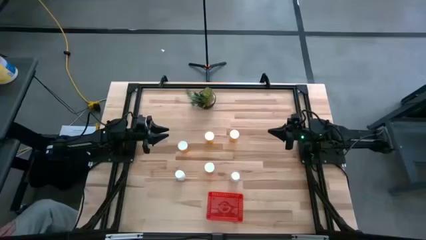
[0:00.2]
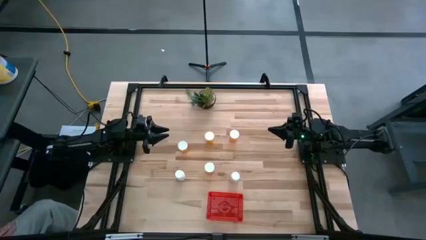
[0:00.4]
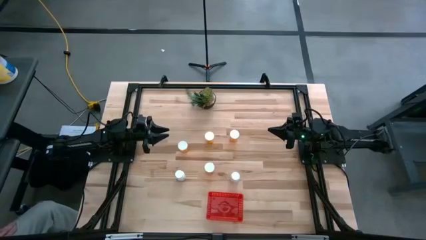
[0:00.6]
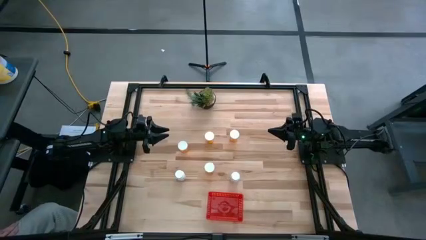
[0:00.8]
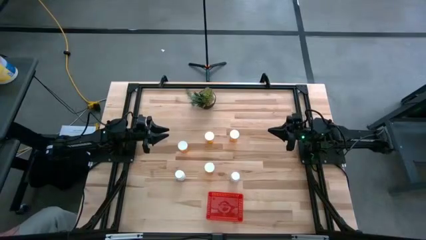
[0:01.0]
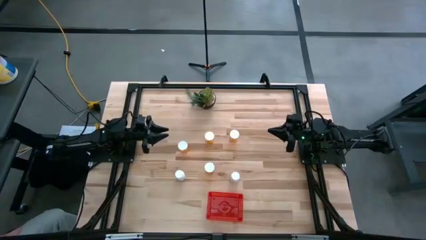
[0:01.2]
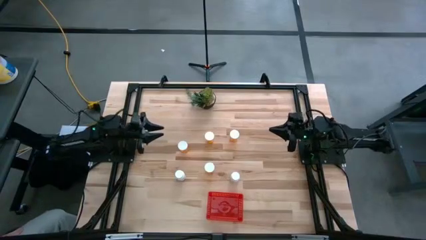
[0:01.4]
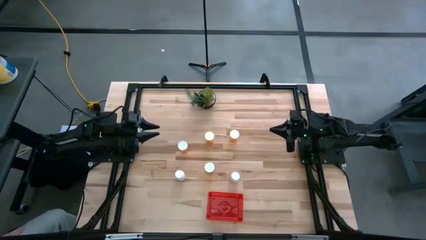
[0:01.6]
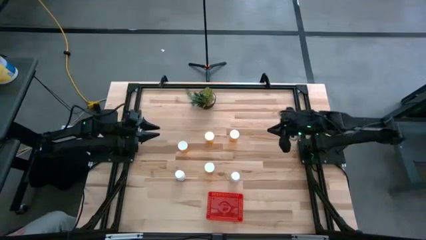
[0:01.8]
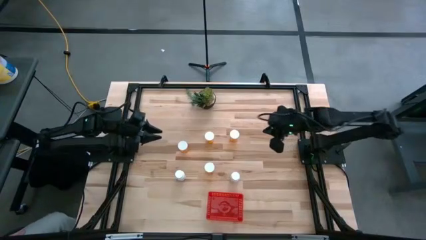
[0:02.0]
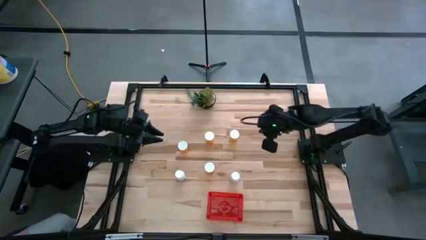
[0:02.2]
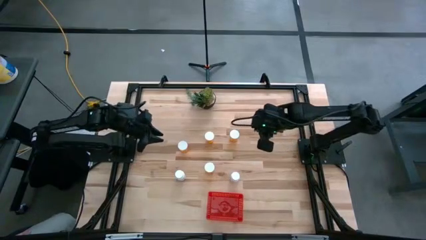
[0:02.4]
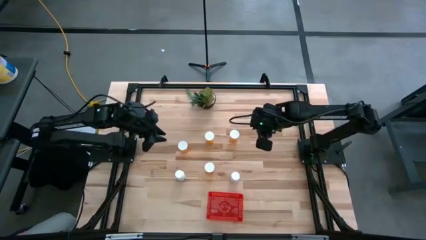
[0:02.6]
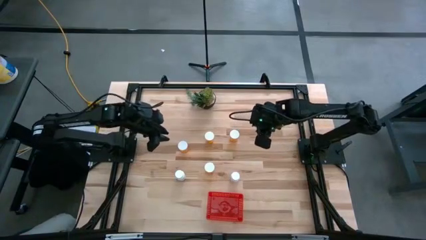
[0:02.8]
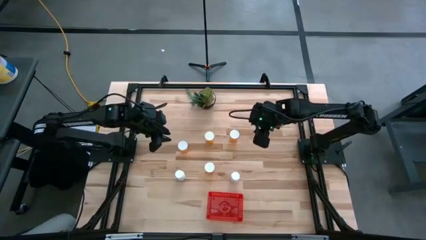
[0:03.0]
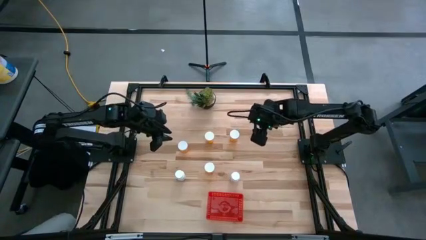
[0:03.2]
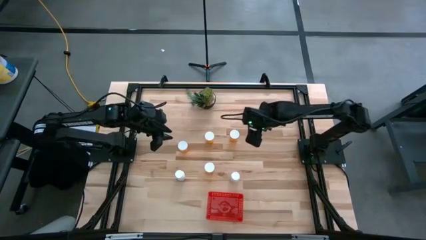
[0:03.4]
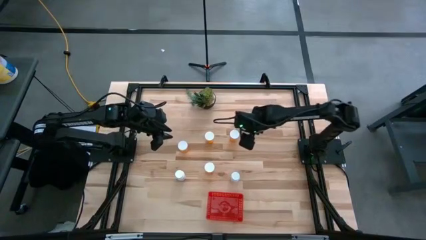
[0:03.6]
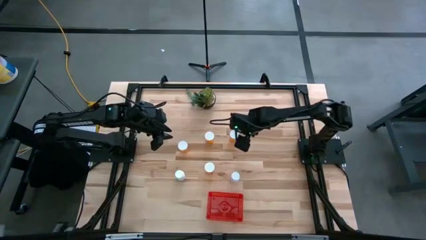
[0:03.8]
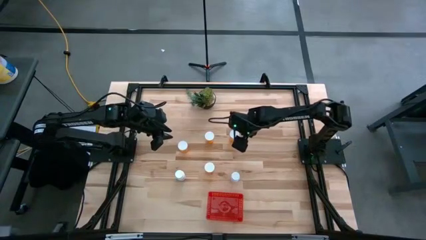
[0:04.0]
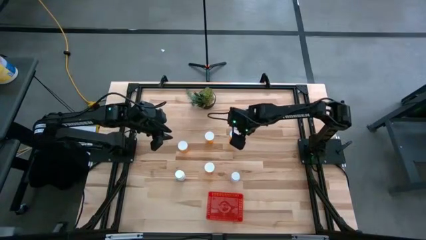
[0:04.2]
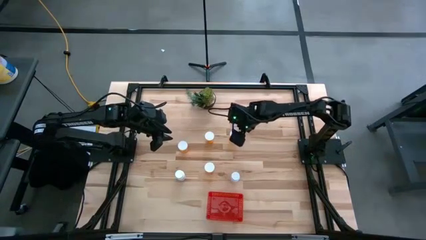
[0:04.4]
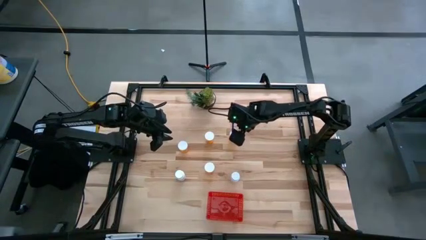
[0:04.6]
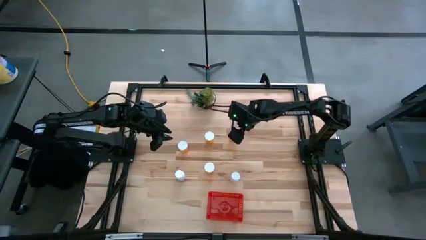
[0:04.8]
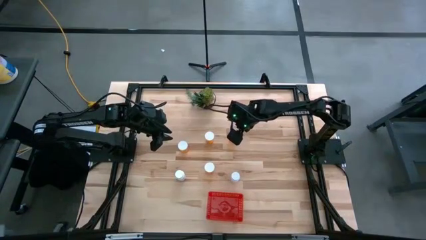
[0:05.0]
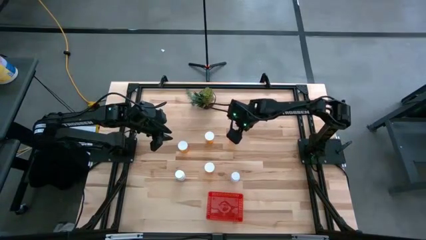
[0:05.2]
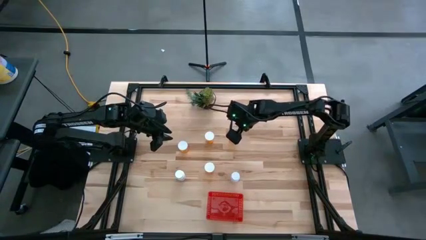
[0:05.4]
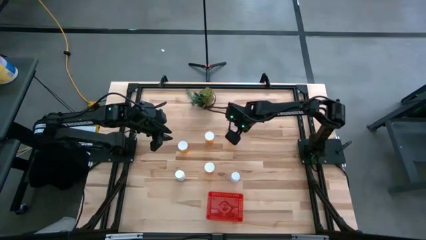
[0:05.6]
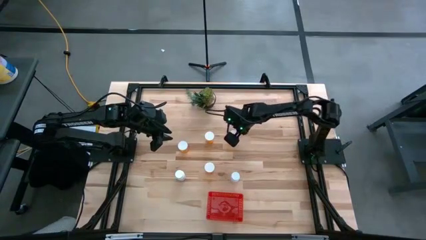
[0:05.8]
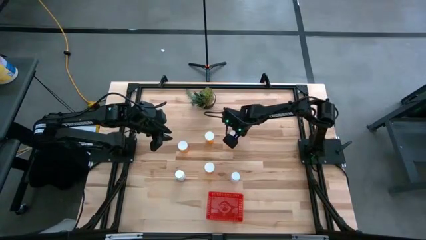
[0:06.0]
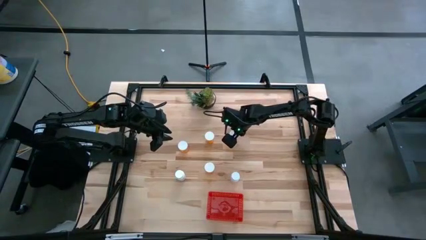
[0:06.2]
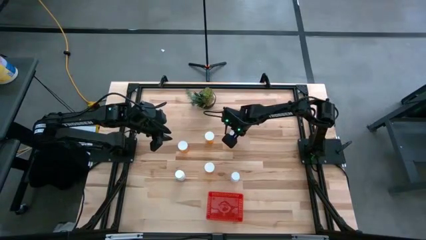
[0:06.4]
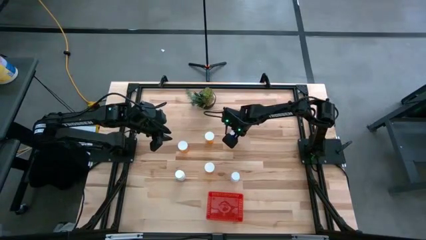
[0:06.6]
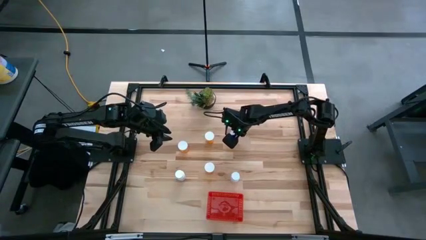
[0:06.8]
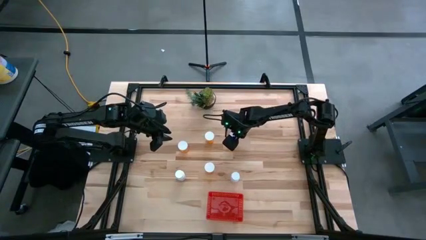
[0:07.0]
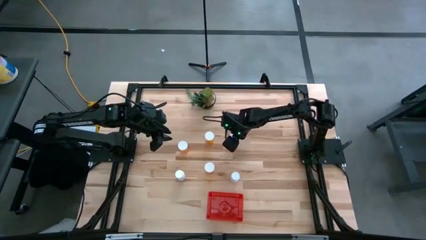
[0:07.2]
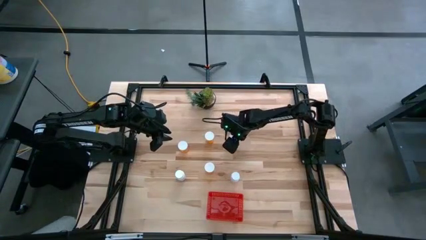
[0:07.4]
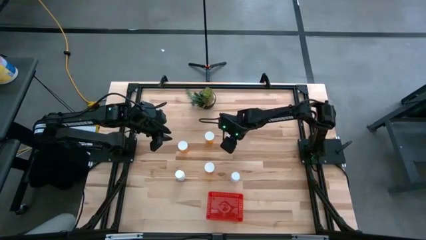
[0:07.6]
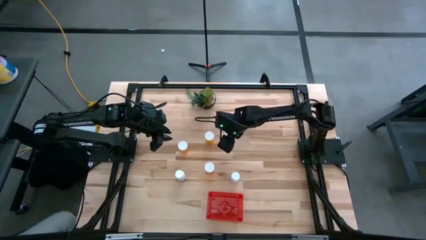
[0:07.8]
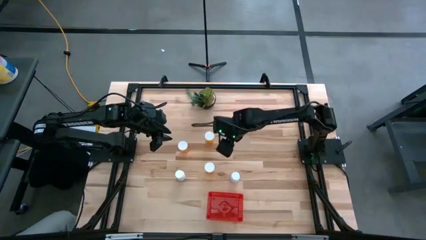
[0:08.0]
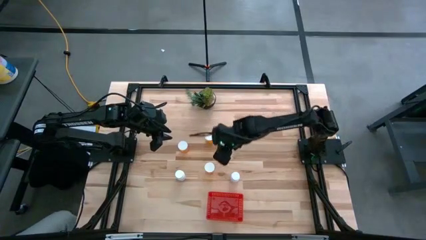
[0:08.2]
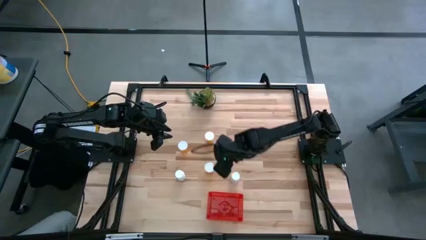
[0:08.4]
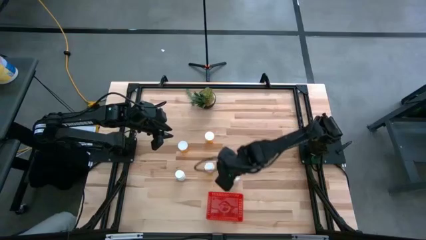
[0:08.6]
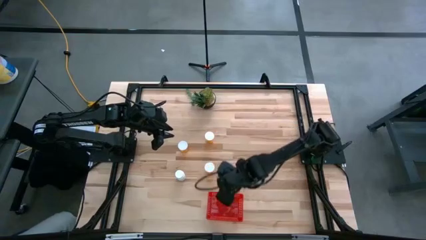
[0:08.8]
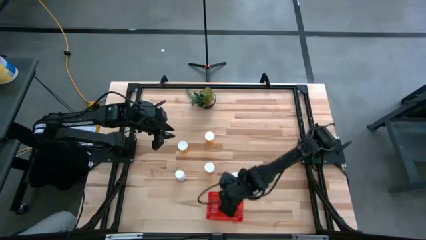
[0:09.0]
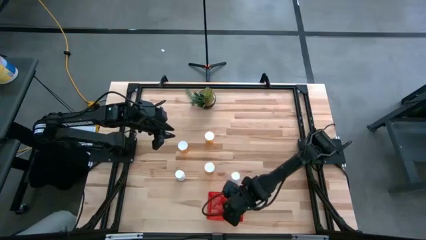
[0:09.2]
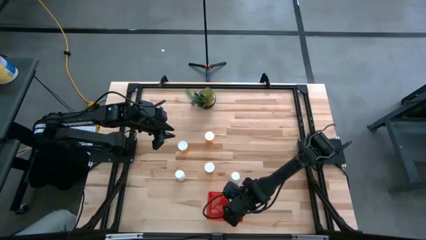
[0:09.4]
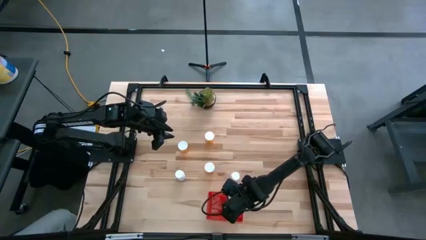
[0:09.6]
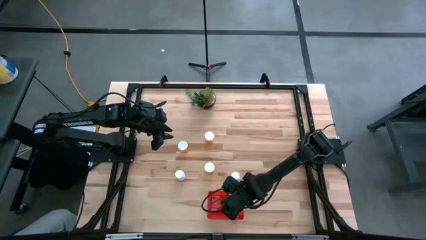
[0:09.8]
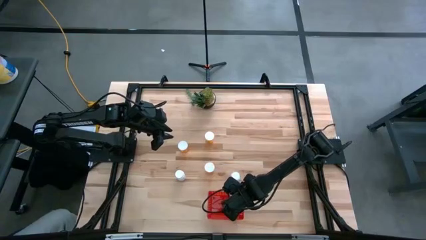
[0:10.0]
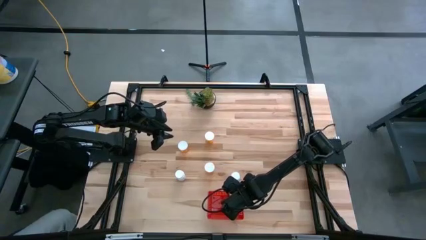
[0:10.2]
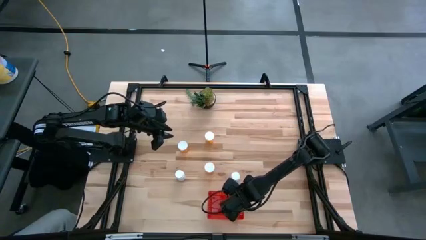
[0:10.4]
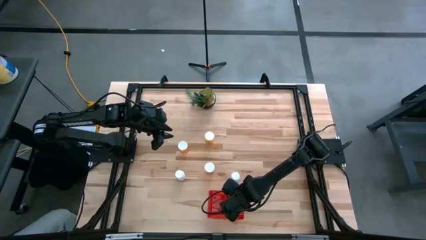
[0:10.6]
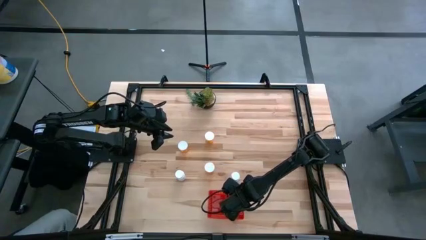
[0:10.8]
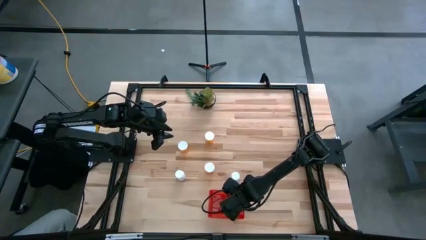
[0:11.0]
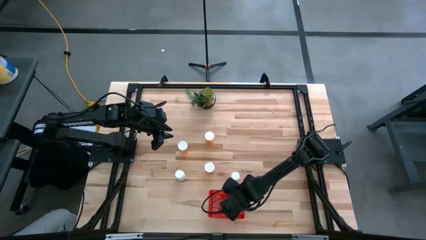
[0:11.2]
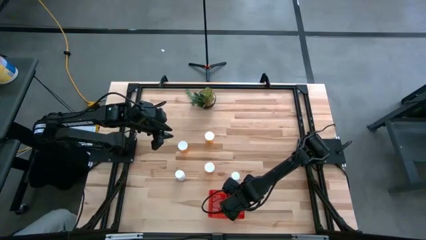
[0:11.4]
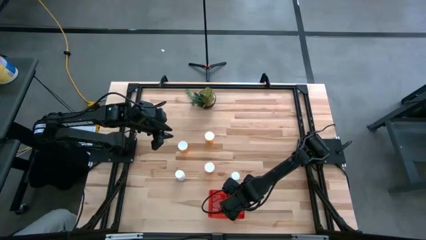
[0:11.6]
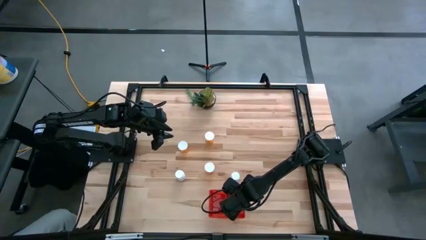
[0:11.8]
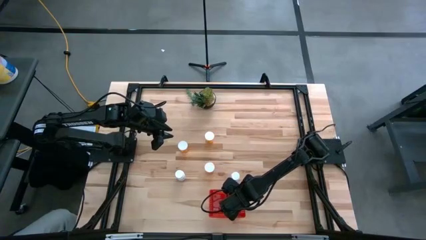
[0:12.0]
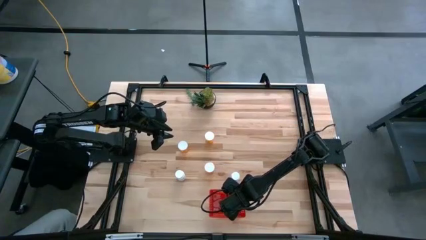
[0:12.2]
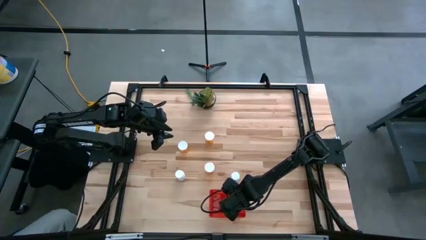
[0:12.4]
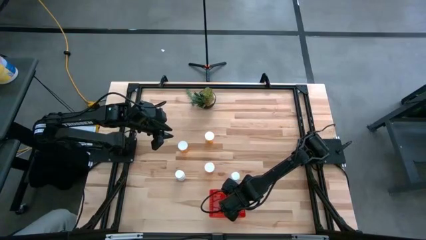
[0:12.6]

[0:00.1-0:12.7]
Task: Pick and place pill bottles into a basket
Put the orange pill bottle into the red bin
